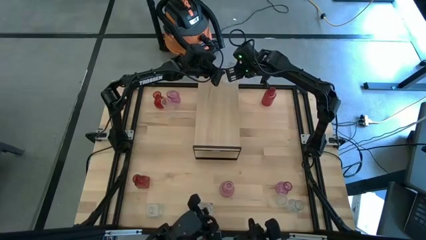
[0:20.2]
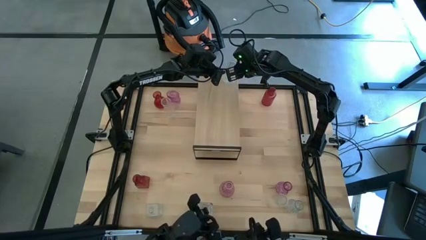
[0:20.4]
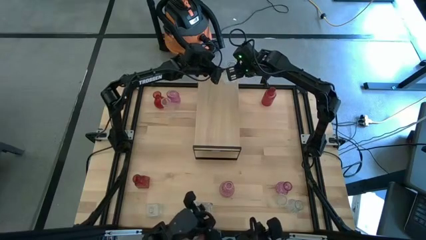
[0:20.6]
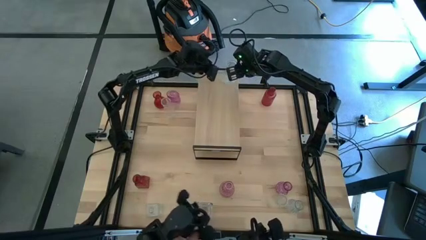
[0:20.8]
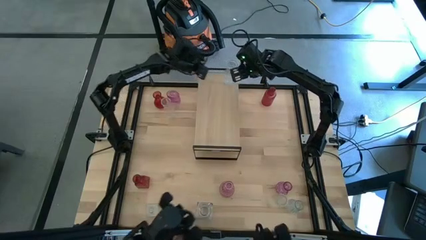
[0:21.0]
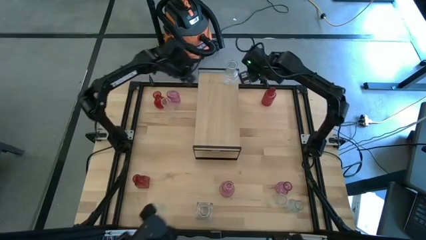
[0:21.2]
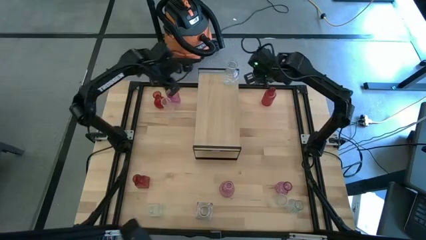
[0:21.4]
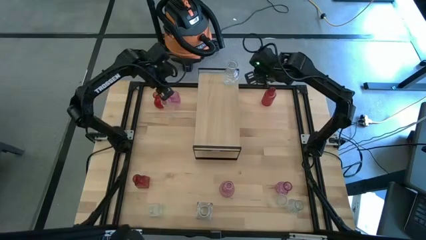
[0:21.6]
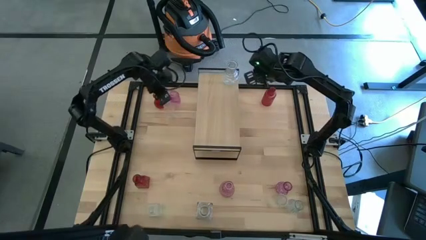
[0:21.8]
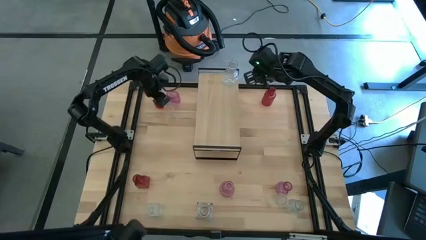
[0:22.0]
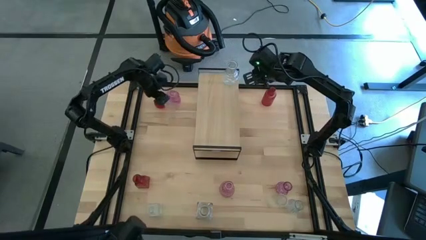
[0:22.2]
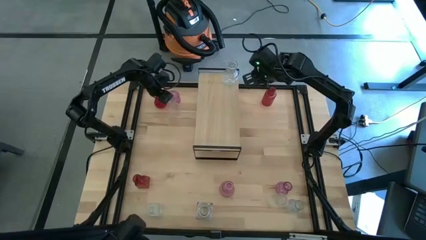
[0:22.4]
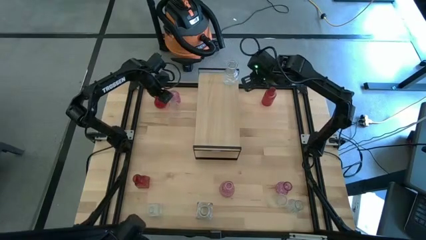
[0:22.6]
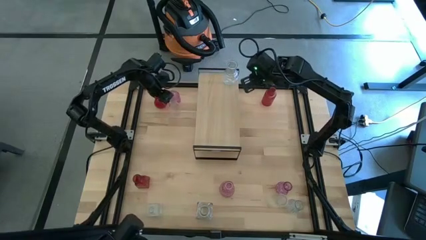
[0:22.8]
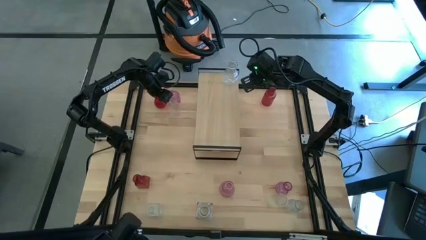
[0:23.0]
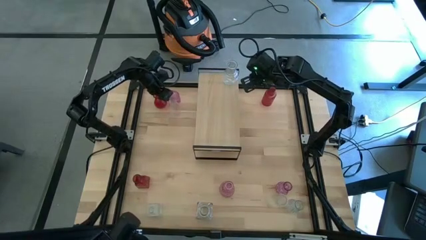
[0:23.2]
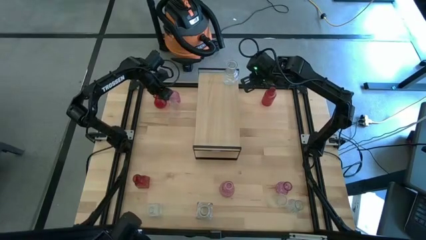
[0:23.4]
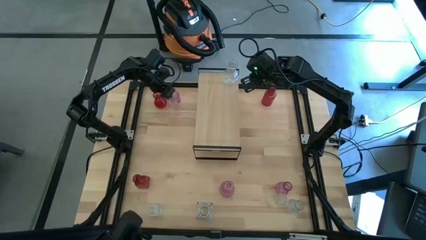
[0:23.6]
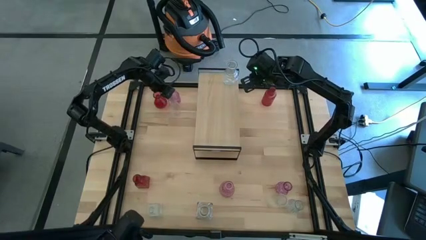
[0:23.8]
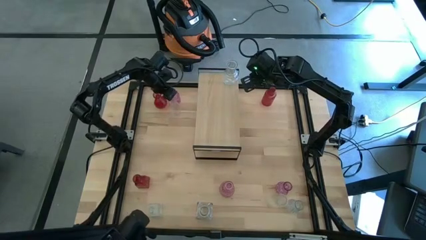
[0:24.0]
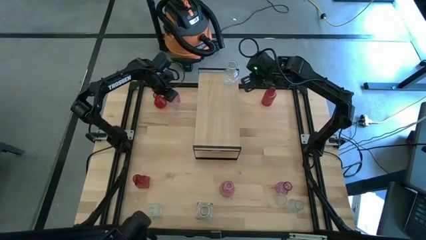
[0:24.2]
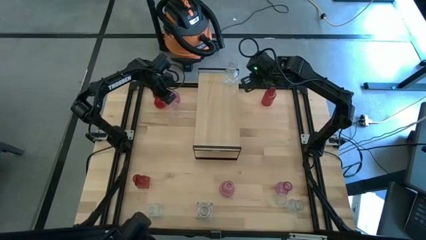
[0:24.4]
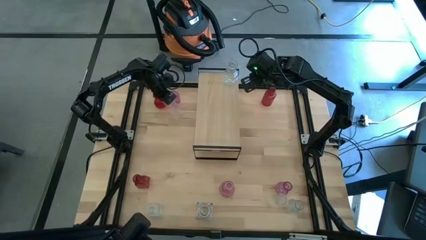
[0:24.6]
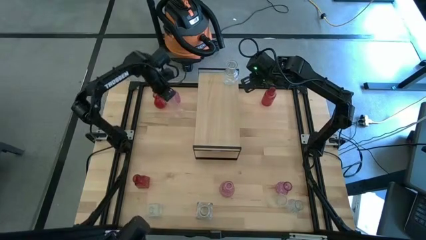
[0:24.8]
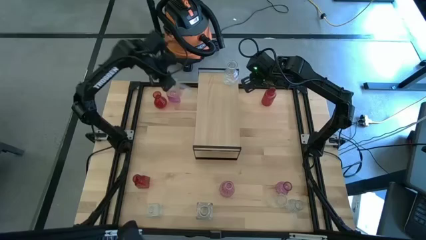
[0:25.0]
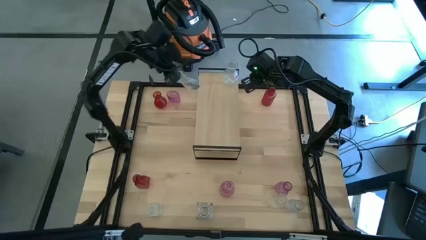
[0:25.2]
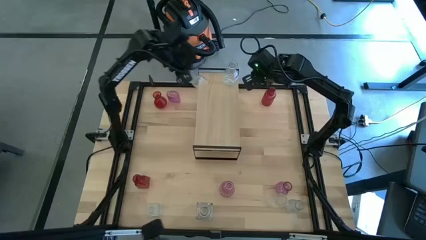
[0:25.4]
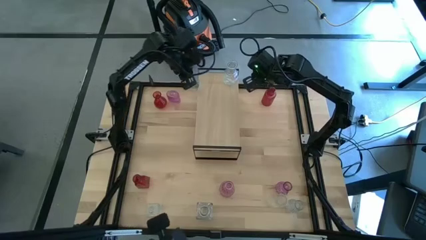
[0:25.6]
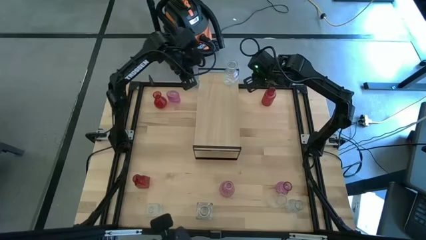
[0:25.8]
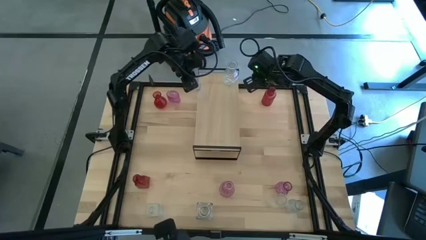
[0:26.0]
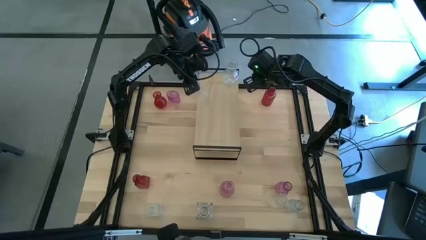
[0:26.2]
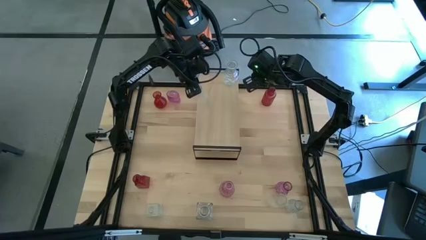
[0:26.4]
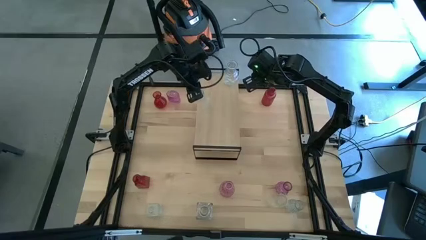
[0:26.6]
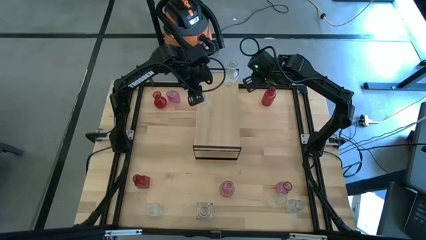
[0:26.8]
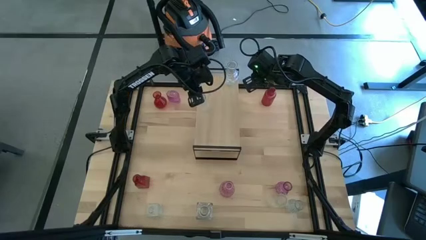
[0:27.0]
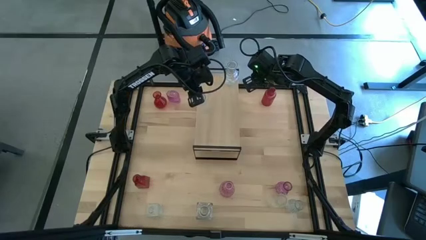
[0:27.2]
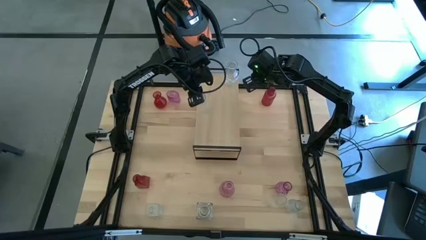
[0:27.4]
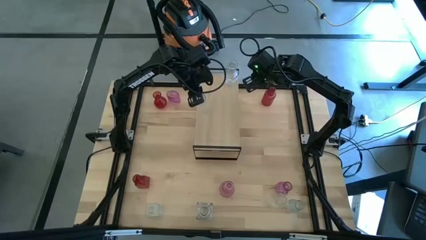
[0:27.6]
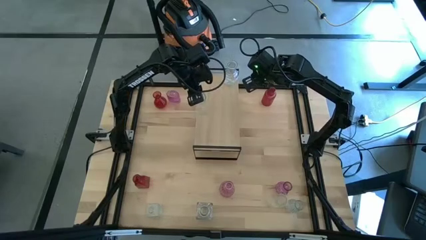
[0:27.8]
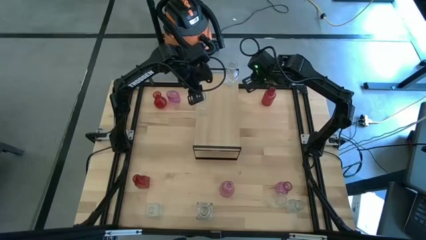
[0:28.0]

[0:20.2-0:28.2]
Task: sort vases onto shelf
Put the transparent vase on the shelf aligned with the other transparent vase

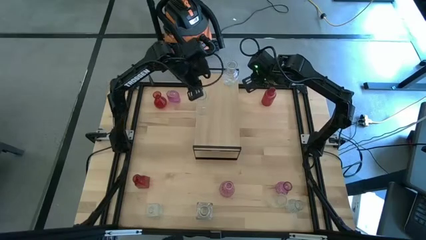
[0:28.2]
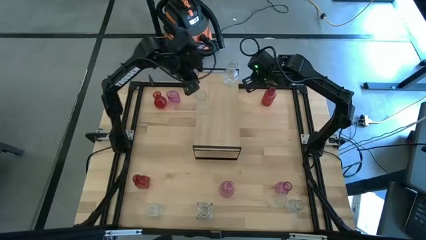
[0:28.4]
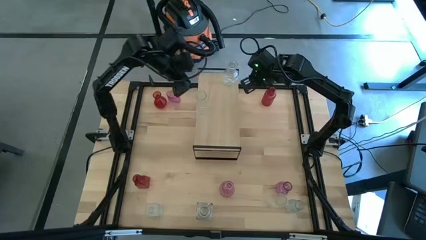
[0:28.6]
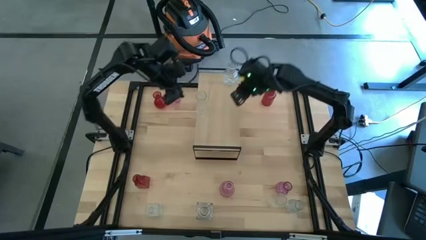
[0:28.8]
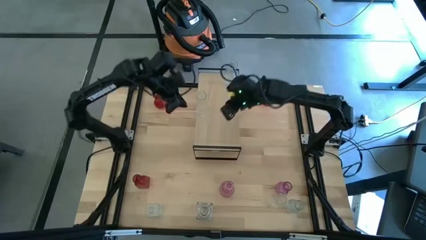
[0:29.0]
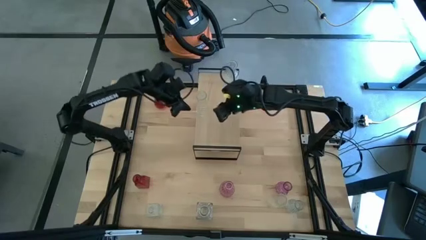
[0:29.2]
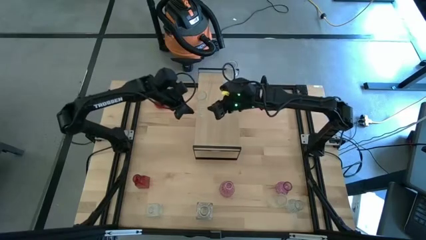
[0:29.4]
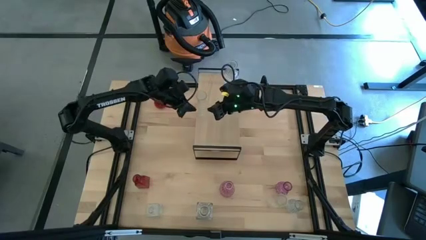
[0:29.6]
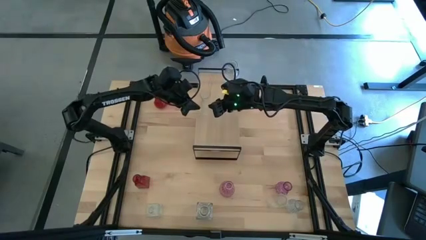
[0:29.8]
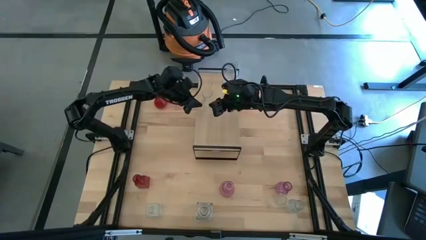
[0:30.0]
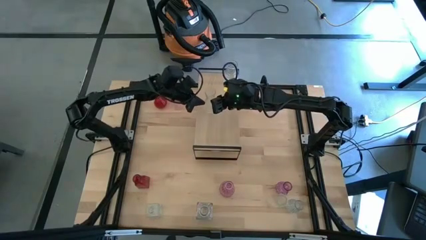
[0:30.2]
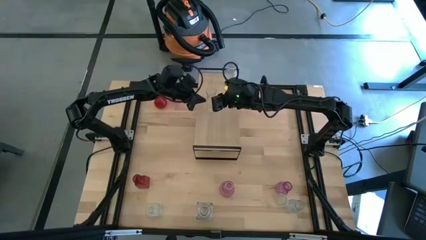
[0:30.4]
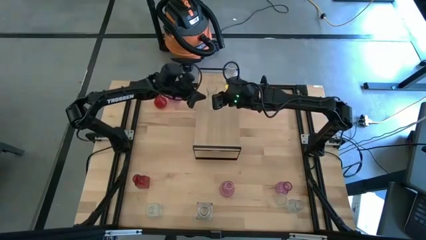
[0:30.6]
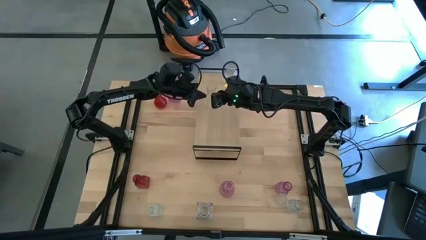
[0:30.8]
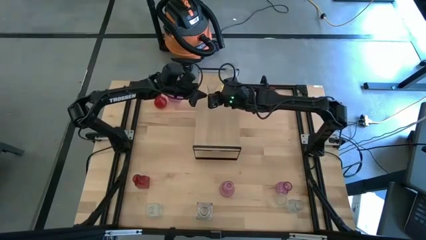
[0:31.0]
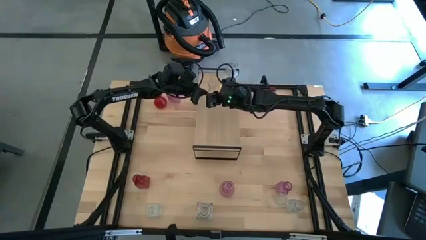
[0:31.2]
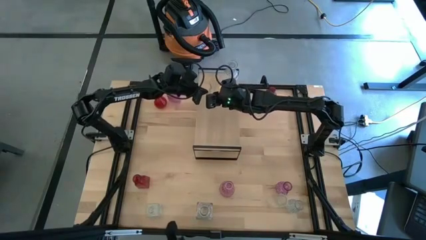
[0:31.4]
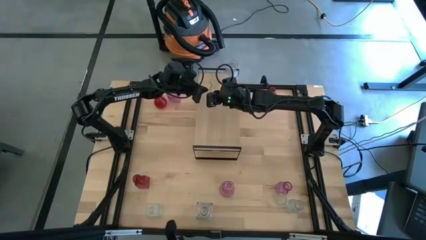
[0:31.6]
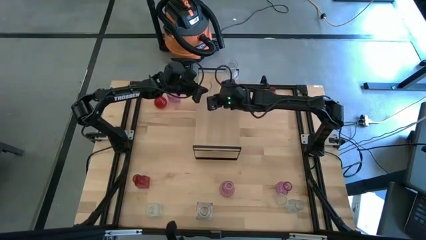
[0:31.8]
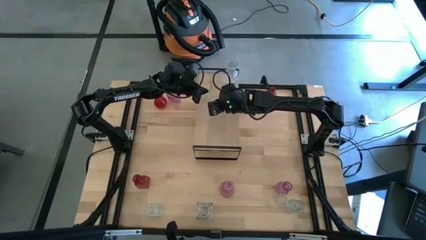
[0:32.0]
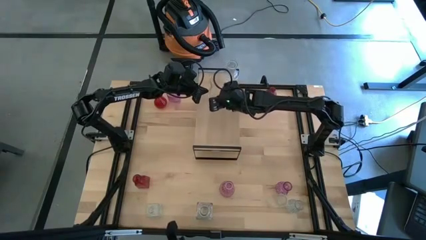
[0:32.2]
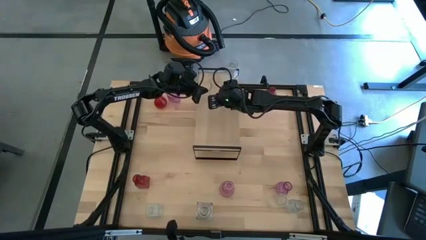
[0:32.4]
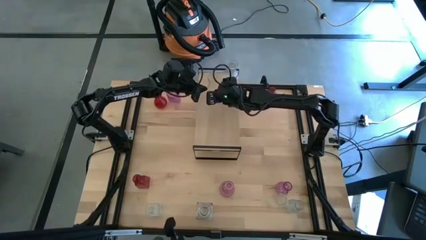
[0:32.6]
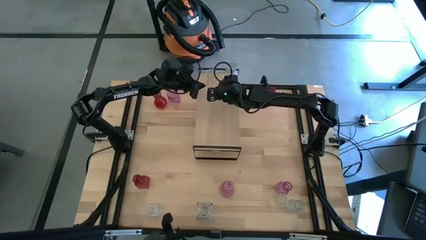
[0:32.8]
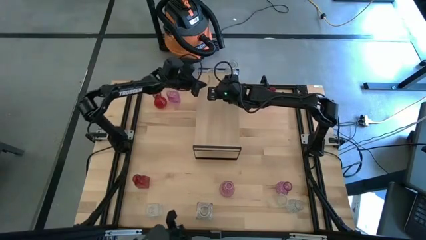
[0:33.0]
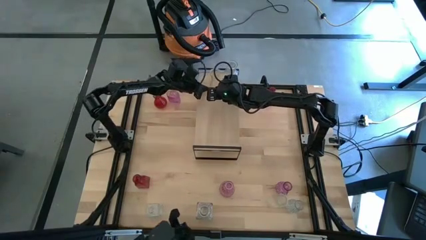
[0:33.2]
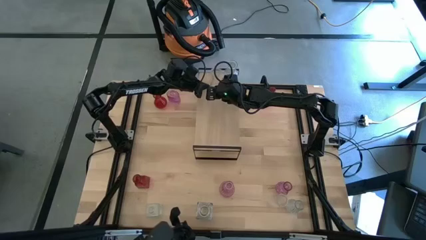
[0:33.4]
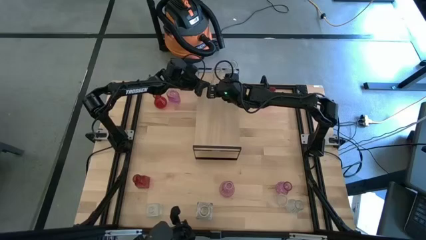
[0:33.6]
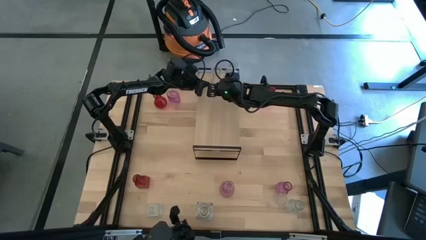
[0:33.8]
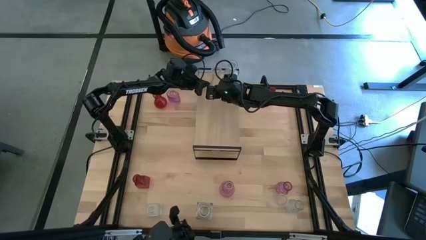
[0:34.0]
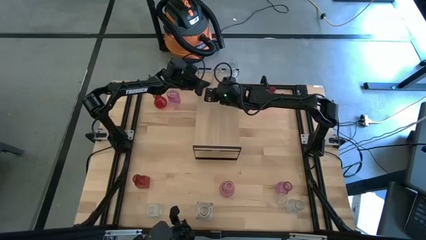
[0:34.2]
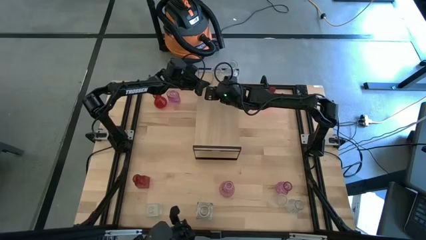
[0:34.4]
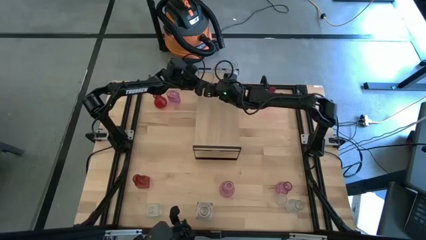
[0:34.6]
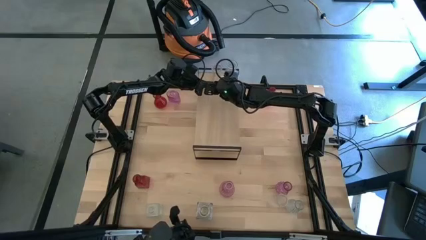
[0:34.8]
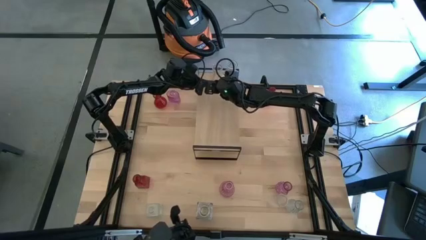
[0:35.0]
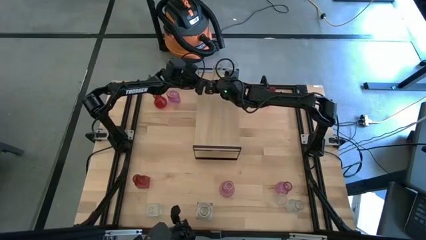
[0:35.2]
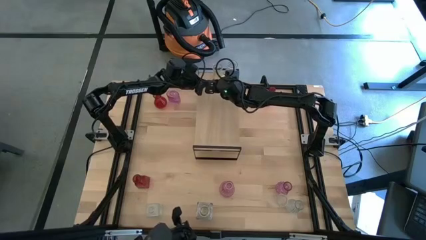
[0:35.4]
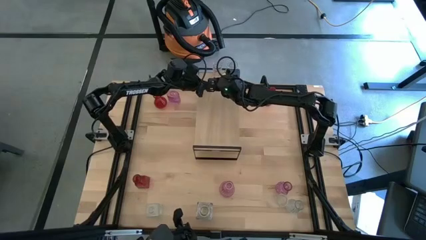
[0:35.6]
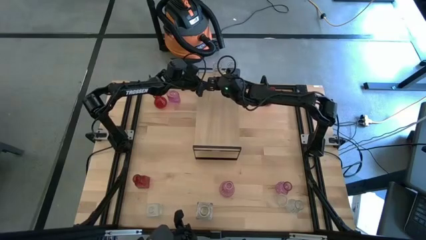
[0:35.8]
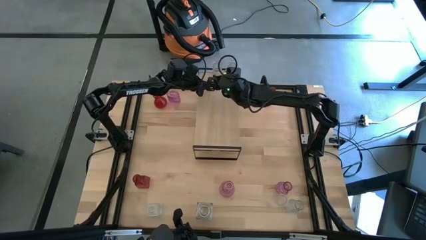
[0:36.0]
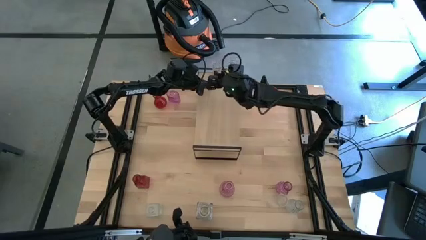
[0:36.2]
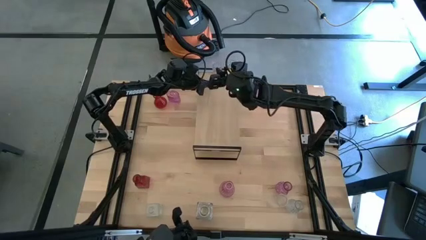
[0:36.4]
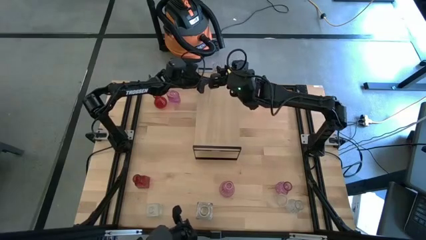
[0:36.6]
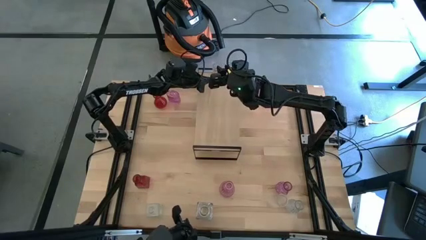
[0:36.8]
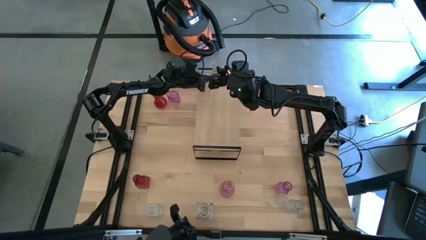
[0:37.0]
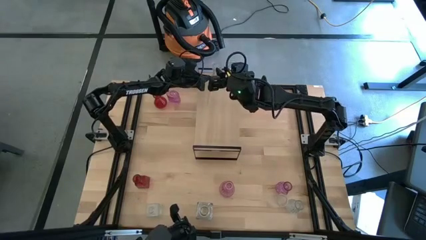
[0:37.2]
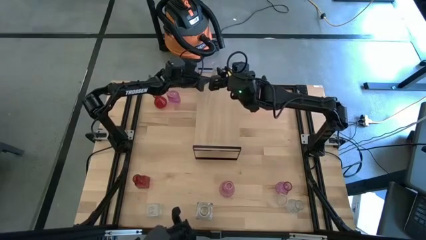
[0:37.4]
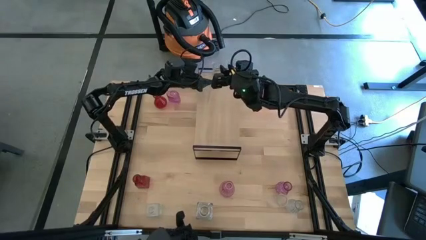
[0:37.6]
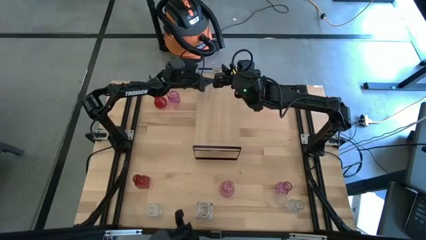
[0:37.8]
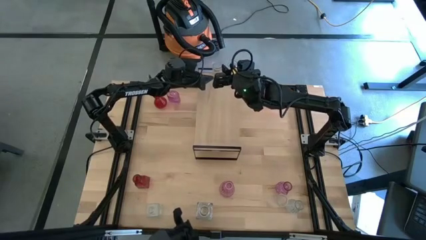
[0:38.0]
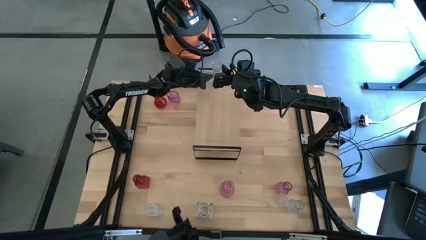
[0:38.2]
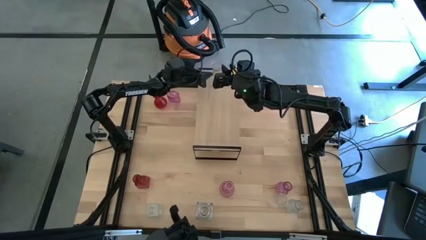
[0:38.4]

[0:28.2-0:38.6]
Put the transparent vase on the shelf aligned with the other transparent vase
